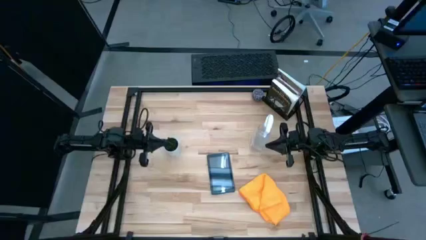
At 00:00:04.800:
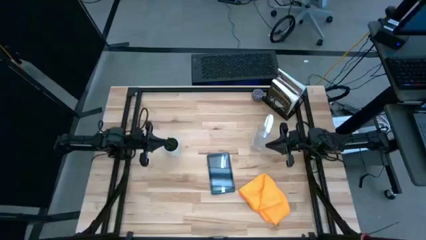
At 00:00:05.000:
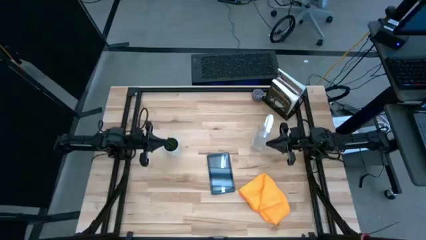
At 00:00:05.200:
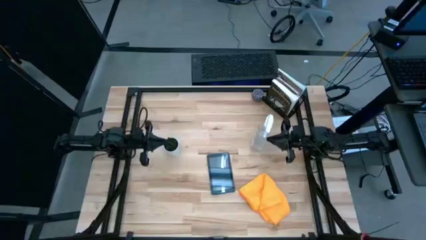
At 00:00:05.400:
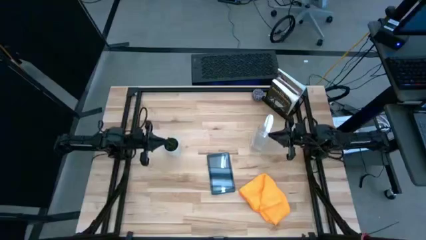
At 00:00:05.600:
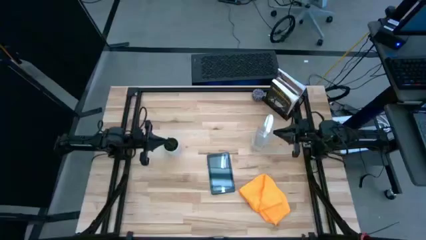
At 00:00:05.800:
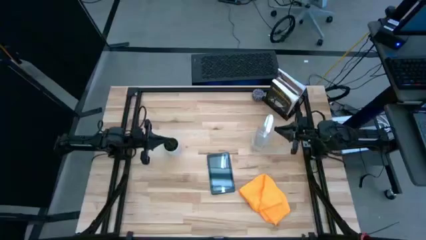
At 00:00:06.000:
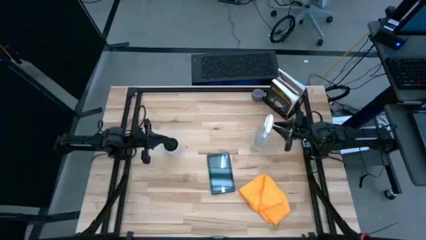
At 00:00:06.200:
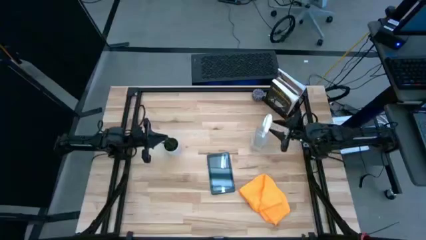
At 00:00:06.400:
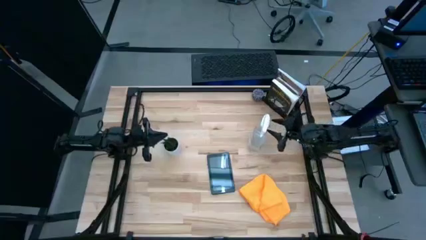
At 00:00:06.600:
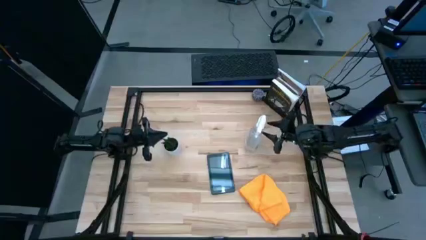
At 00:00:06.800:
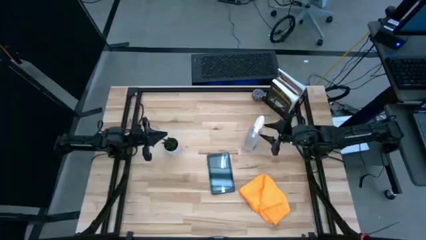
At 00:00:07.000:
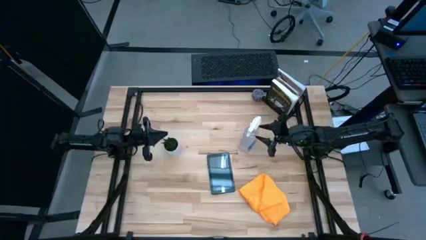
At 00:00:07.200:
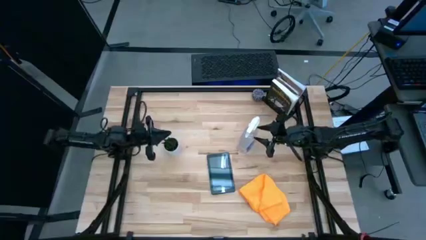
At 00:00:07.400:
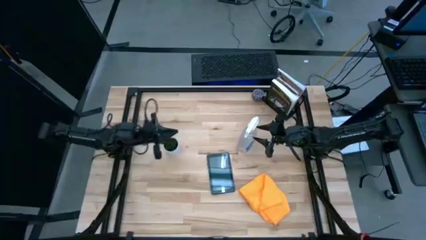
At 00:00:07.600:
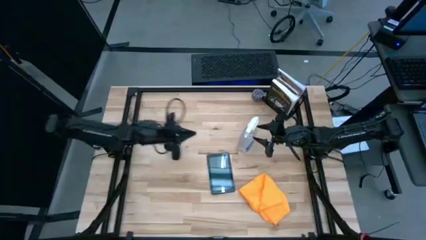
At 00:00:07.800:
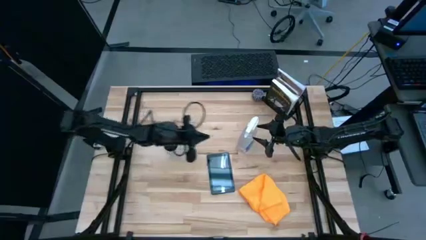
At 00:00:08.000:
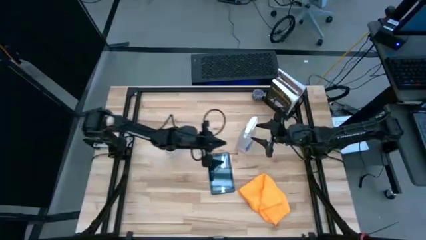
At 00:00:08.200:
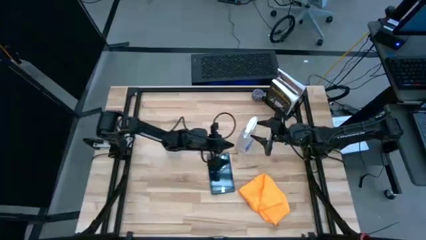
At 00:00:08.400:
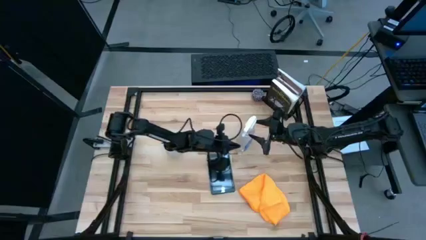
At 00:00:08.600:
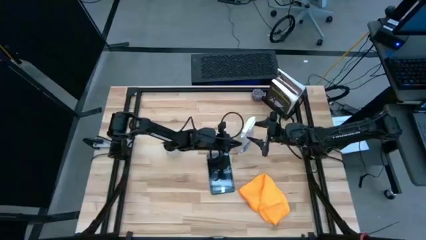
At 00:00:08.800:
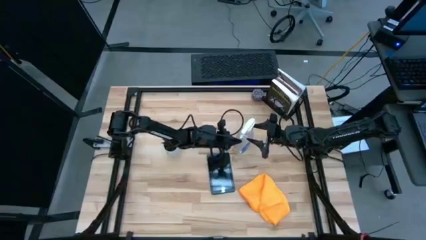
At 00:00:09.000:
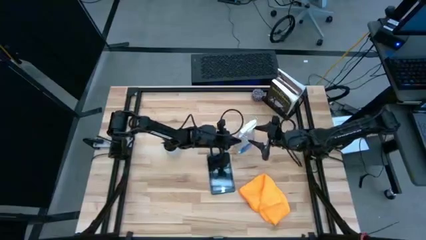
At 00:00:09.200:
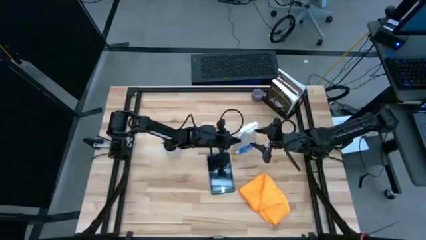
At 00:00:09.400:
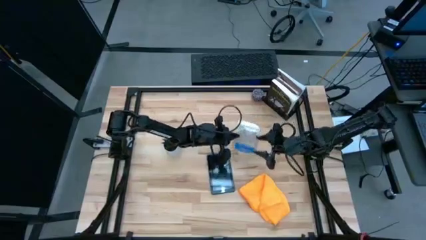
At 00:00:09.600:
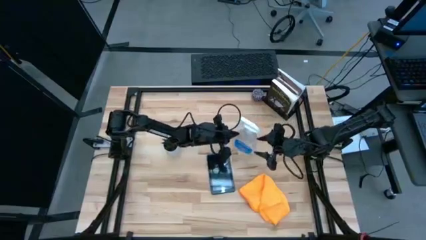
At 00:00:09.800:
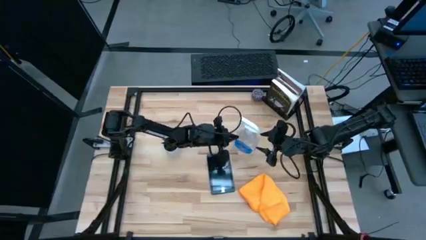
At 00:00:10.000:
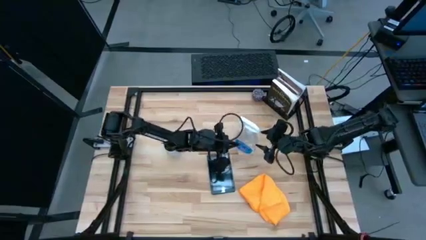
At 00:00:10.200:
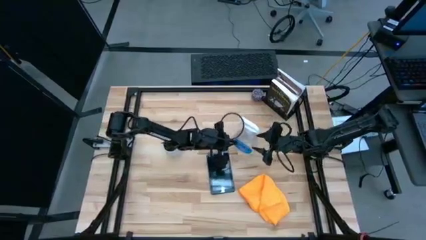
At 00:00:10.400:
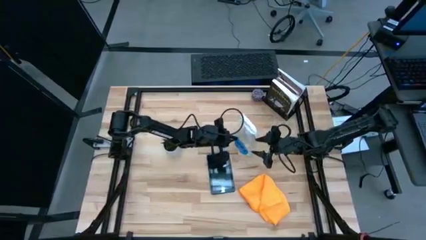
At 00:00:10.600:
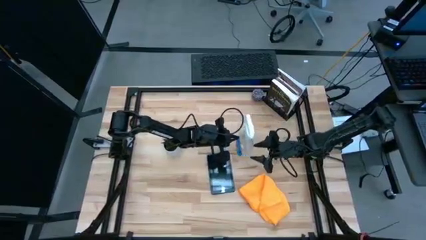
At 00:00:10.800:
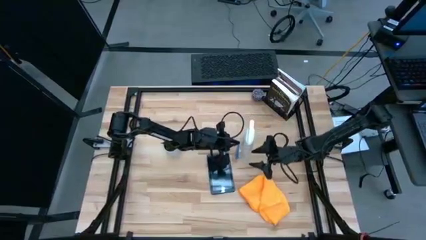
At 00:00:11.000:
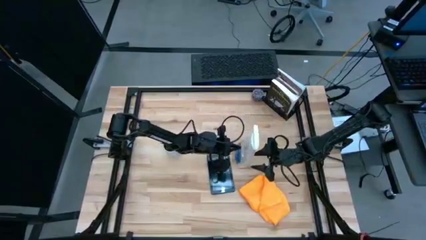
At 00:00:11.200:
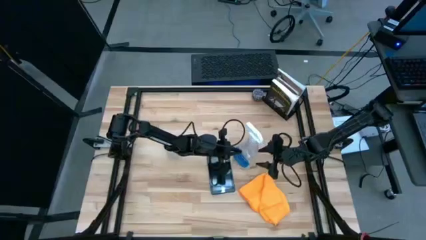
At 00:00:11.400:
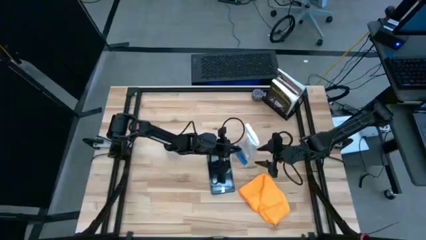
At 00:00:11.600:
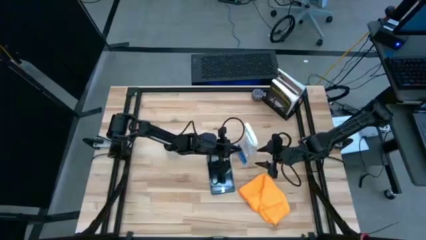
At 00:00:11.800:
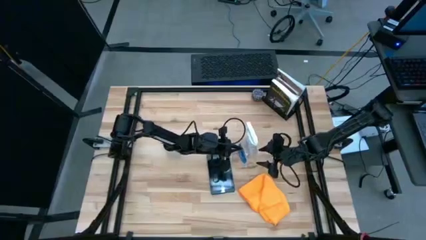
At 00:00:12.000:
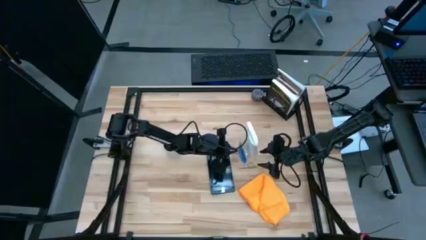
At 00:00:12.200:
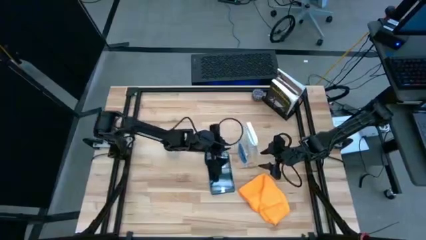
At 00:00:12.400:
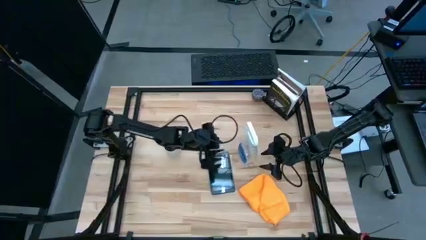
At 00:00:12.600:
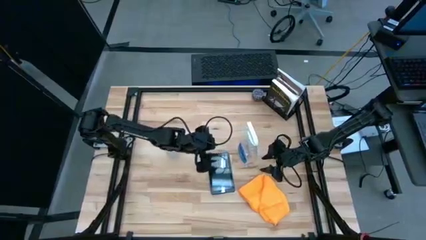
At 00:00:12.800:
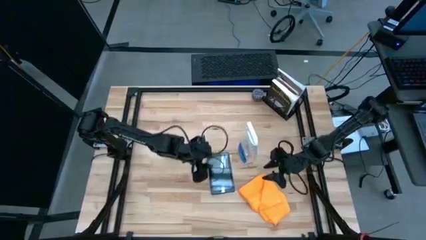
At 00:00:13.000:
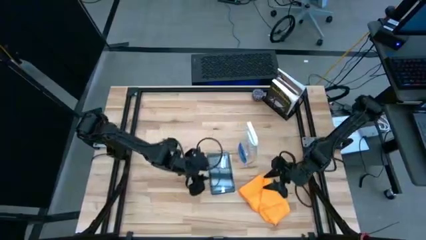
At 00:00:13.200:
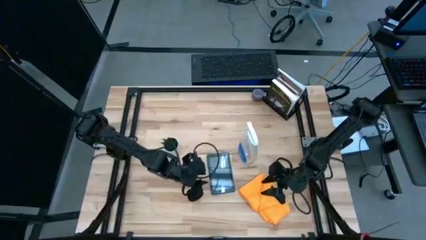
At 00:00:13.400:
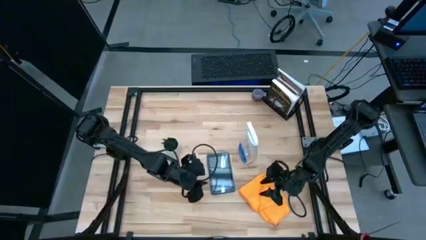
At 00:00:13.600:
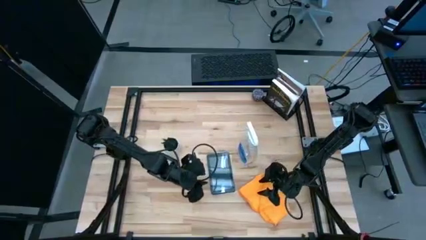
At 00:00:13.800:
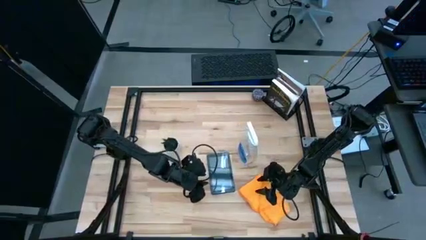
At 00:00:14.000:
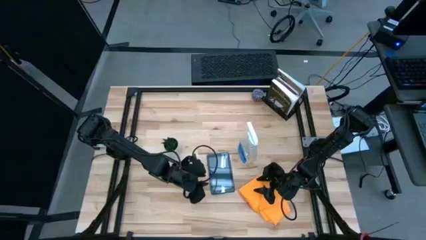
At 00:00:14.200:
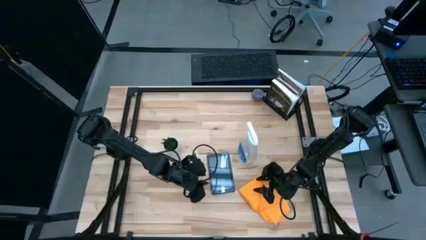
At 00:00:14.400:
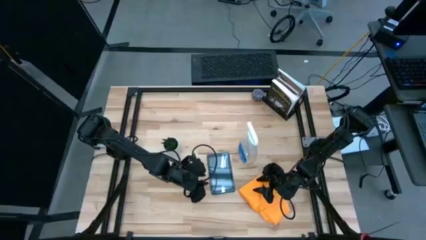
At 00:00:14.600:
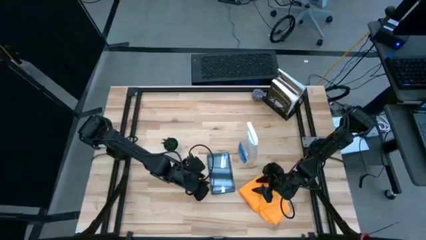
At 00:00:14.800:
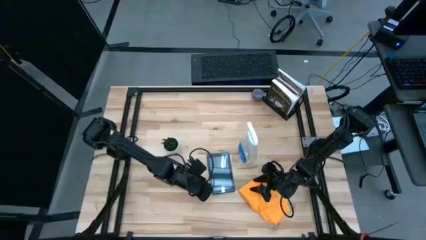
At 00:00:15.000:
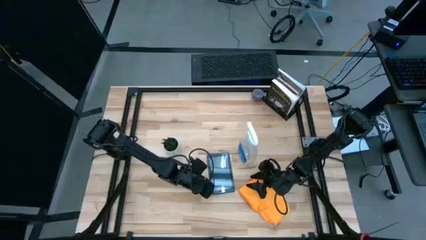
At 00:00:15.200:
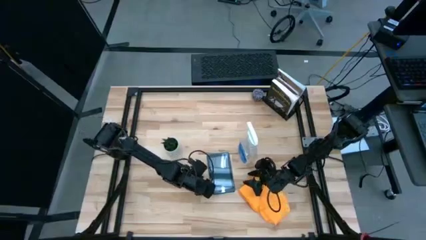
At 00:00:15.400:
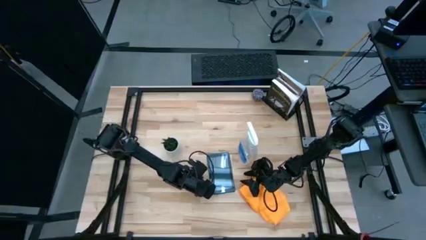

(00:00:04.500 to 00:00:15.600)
Task: Apply microfiber cloth
Spray the front tablet using the spray bottle

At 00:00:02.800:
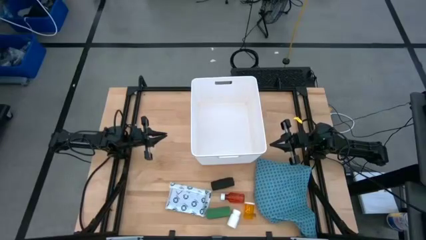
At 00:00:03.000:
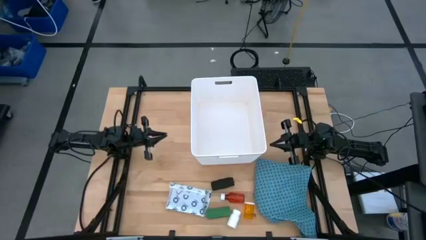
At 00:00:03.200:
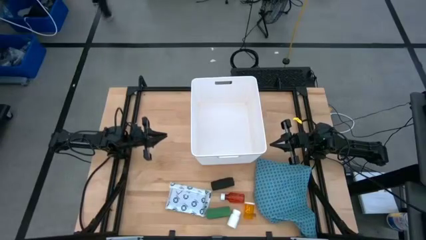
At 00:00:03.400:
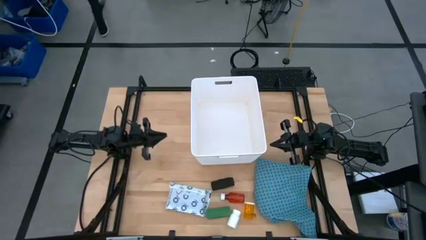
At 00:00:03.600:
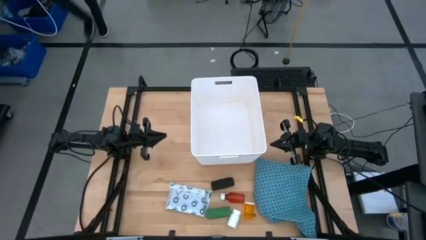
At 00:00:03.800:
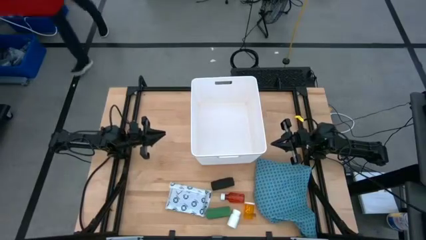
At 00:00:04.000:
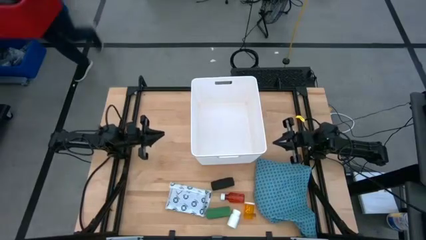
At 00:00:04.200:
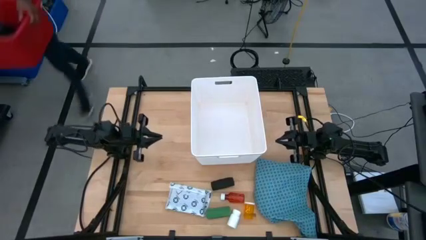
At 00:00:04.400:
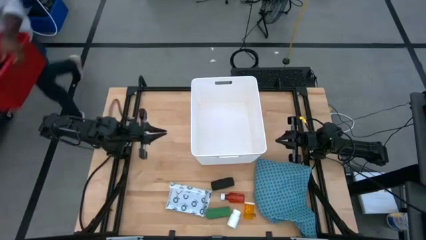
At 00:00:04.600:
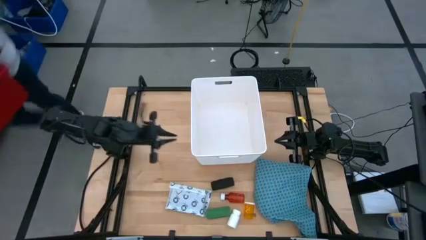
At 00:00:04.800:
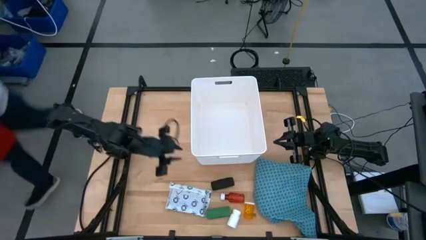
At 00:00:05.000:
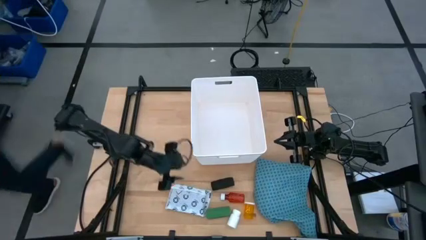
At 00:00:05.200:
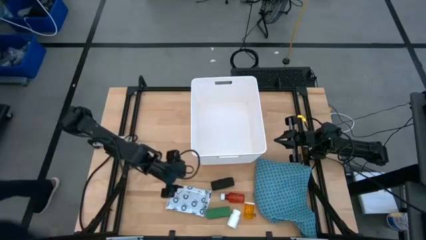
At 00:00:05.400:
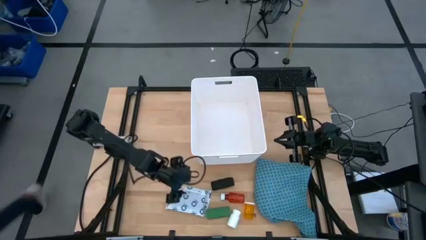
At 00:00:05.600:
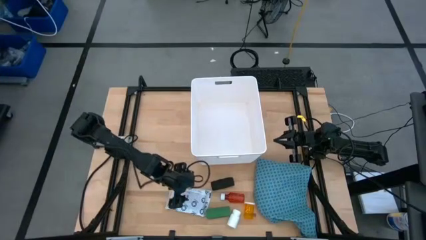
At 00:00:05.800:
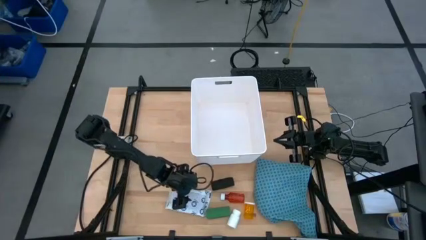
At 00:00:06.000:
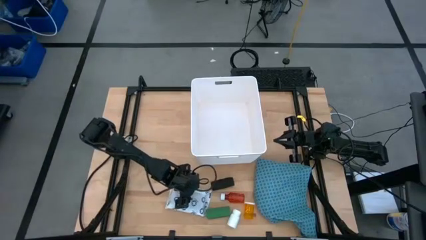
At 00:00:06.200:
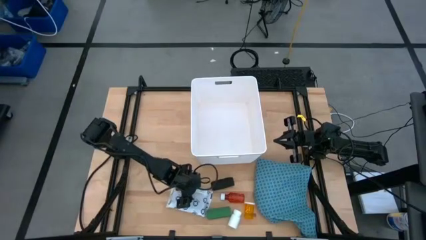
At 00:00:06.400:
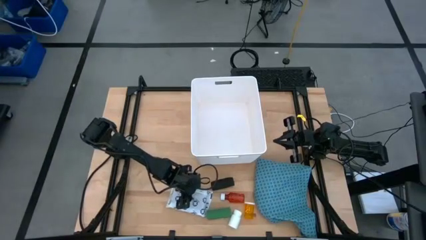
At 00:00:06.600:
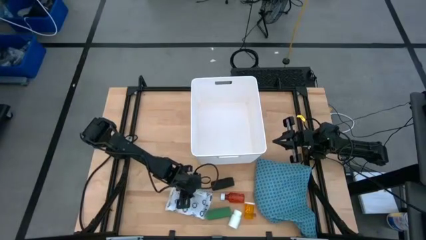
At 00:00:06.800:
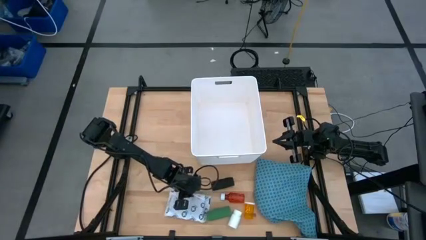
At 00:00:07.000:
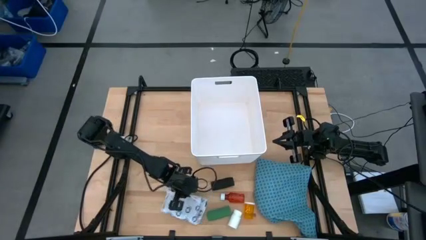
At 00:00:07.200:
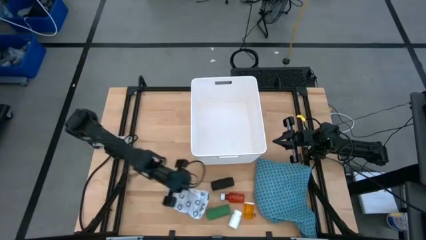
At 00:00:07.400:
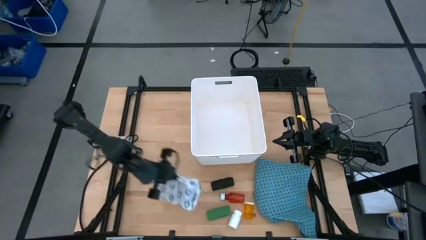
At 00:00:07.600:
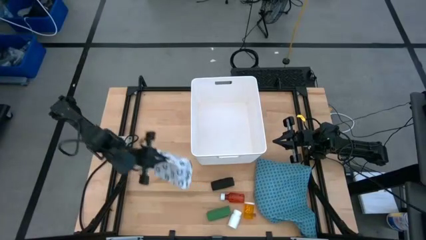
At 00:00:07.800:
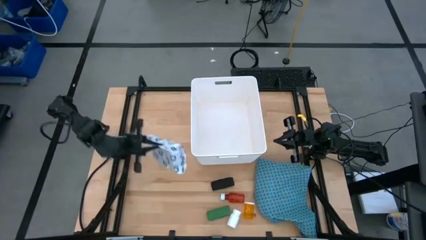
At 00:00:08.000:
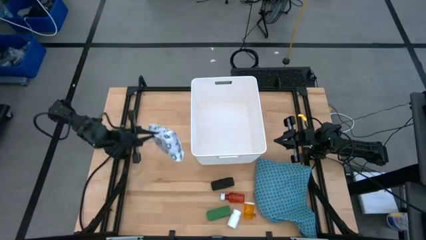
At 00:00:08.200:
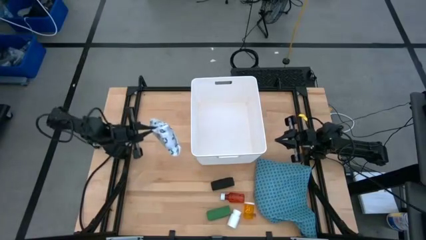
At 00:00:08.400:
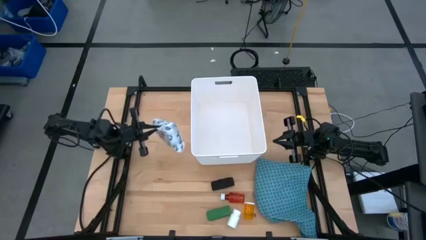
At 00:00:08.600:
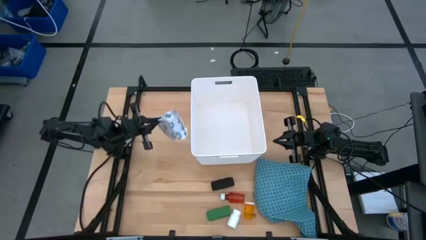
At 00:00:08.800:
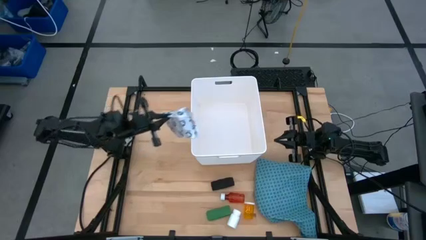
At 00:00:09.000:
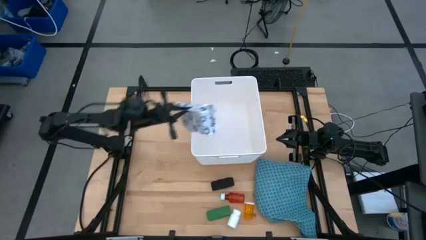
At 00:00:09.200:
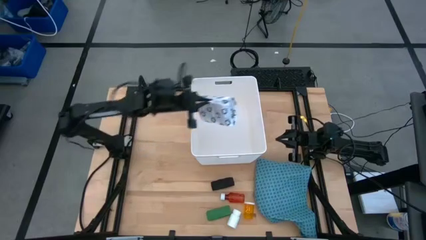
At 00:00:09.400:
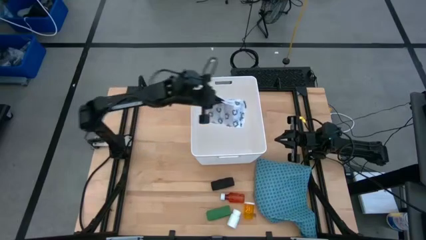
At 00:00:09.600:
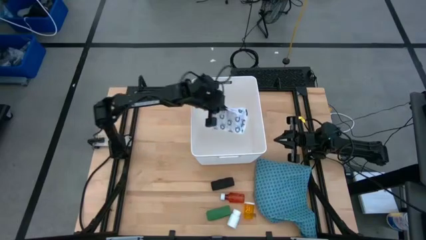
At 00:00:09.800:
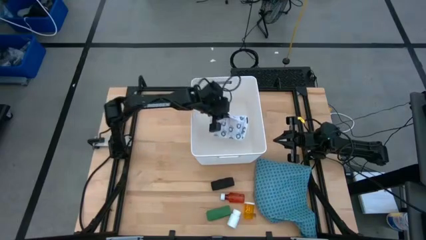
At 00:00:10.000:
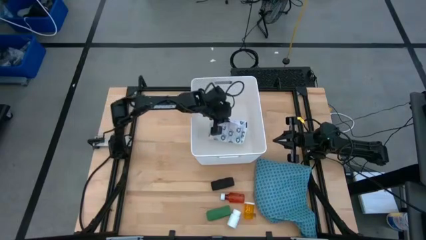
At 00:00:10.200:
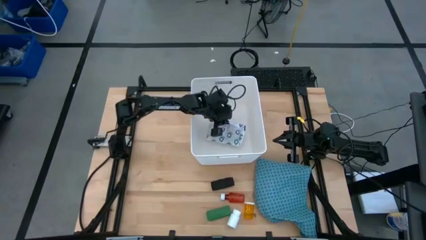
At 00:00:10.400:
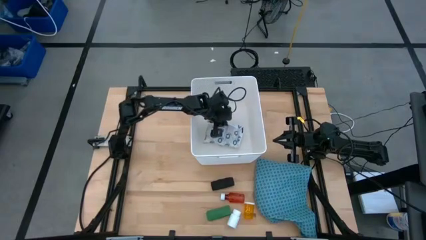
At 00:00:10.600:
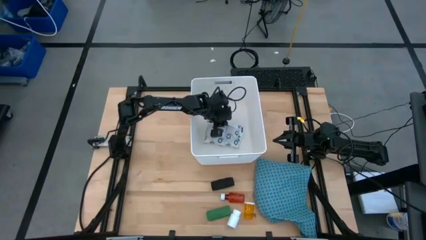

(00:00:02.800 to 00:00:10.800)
Task: Pick & place medical supplies in basket/bin
Put the mailer bag into the white bin
